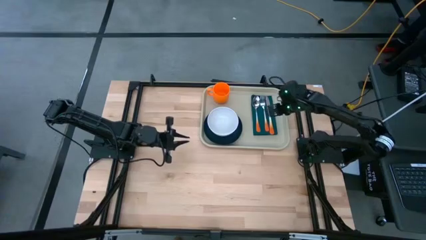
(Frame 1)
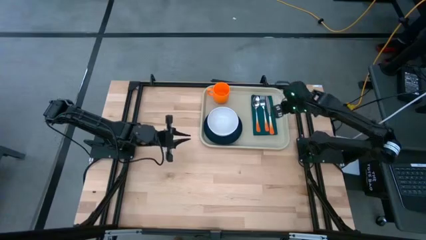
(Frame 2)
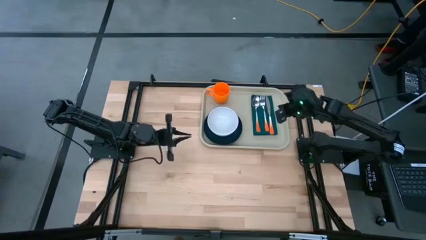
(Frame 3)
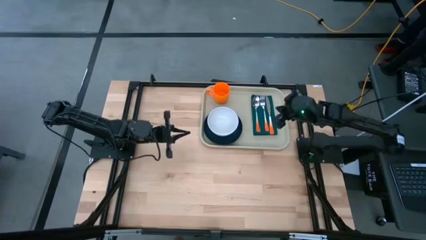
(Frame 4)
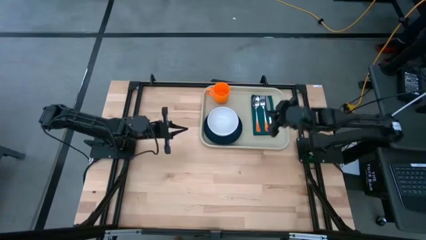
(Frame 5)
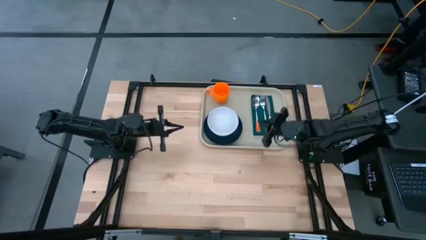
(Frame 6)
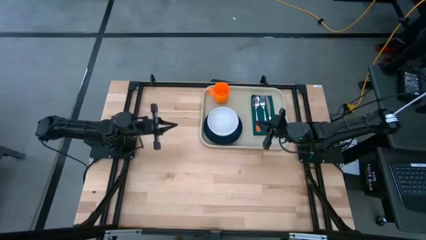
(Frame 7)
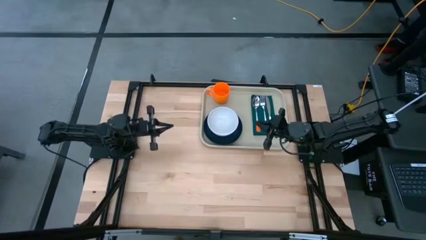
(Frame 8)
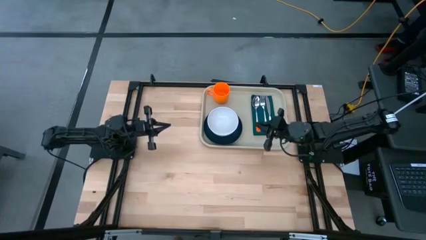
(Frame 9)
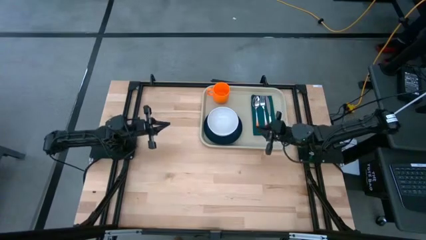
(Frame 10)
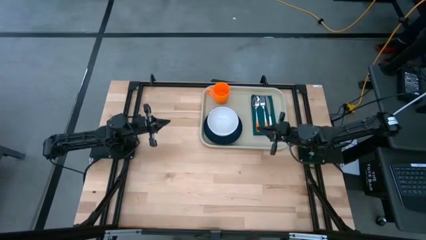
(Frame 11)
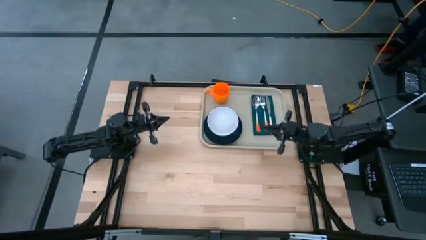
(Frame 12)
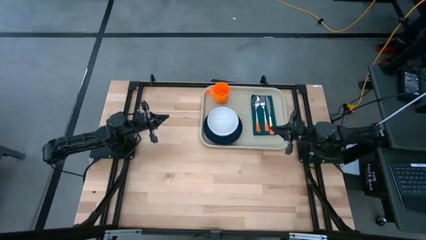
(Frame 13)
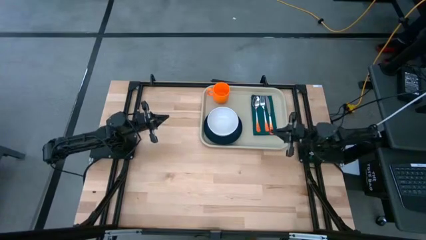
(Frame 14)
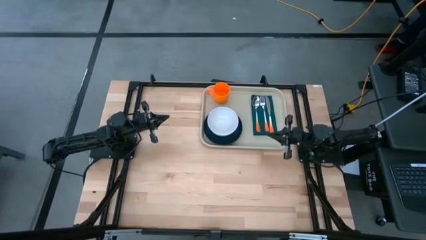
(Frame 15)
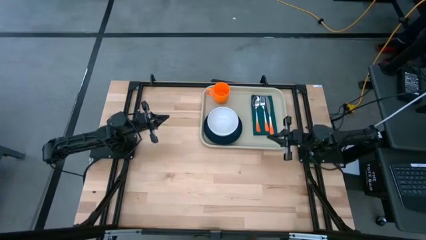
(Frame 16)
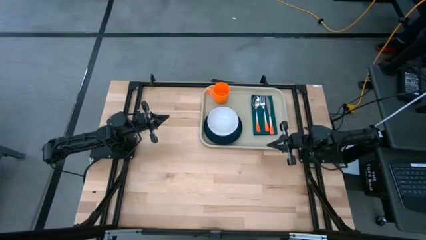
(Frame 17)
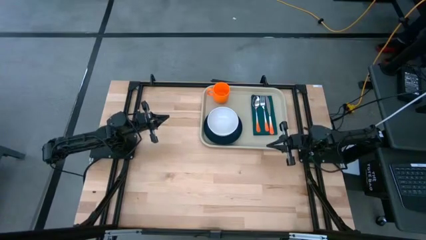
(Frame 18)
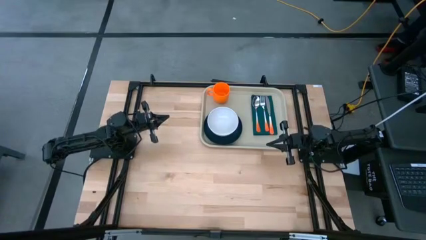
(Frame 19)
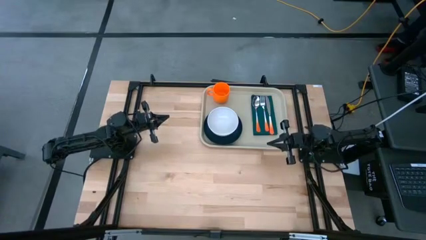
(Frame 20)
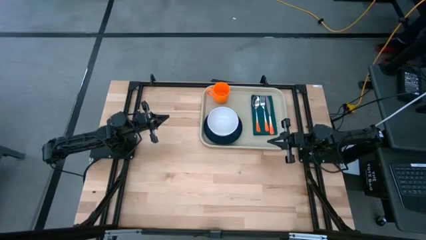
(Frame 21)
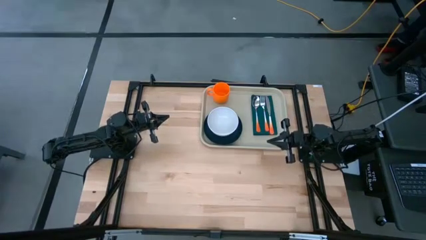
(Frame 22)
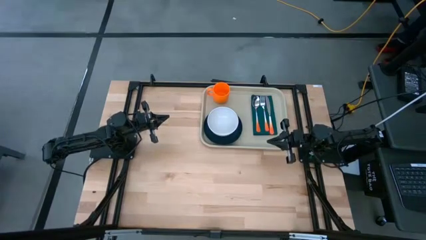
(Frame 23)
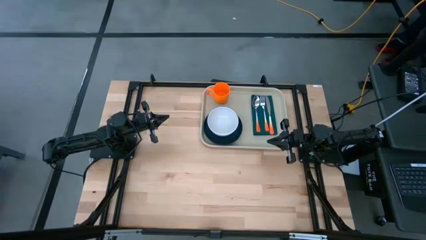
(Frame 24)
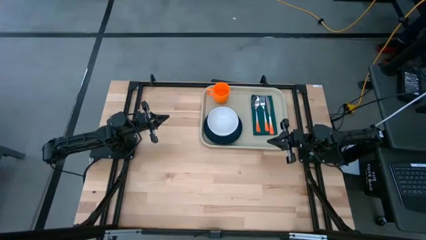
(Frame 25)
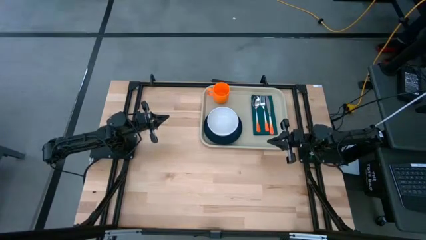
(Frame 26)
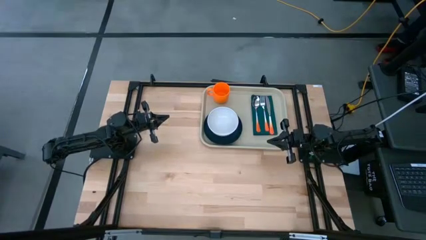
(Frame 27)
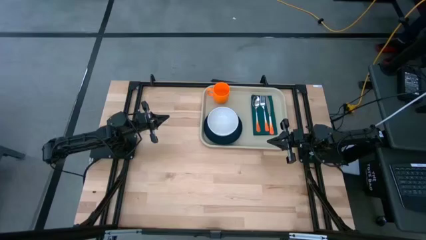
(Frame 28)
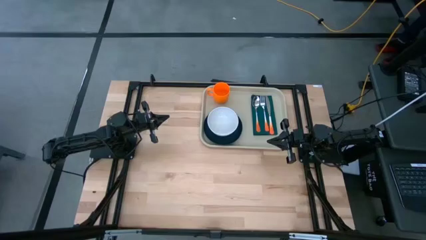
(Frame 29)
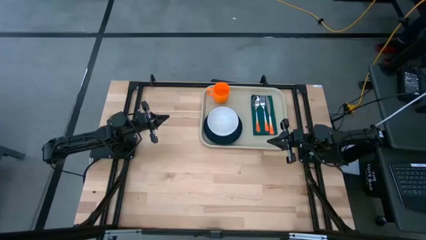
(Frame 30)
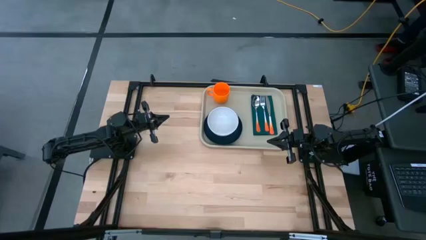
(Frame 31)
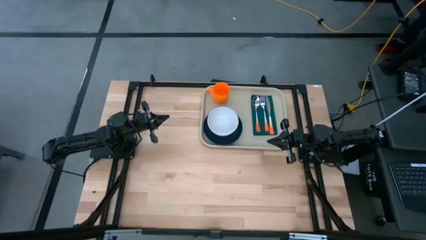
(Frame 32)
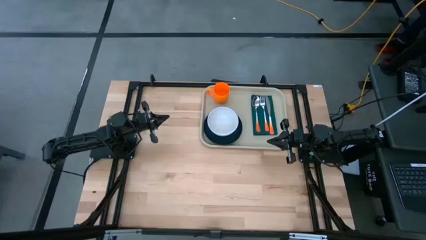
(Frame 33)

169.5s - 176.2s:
Task: Set up tray
Return to Home Position

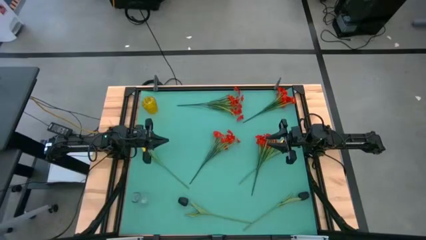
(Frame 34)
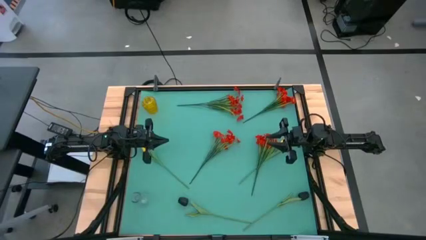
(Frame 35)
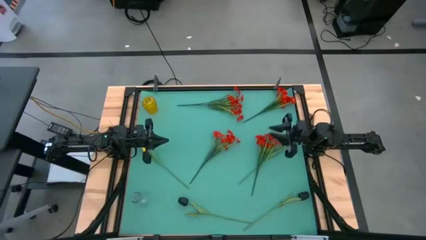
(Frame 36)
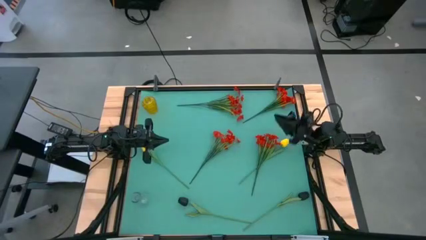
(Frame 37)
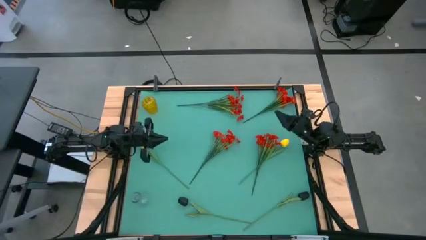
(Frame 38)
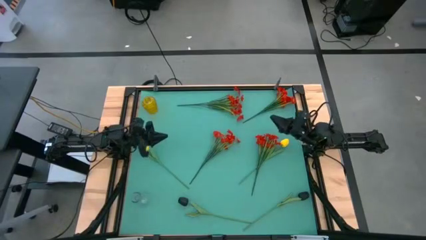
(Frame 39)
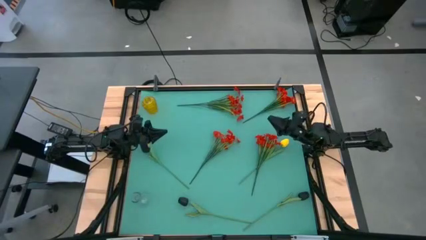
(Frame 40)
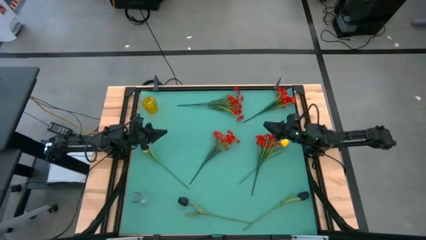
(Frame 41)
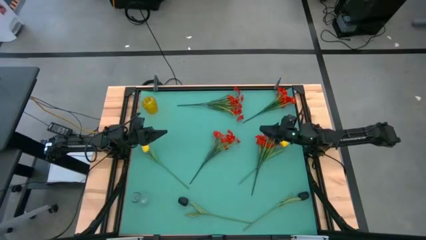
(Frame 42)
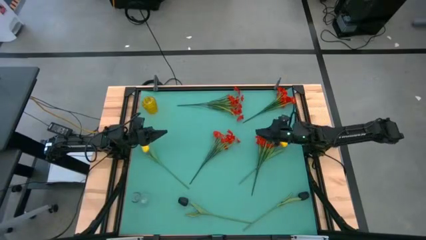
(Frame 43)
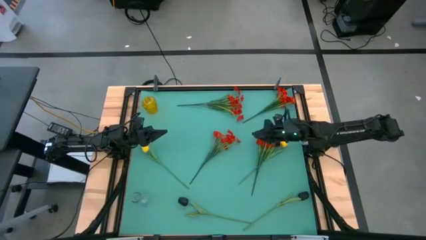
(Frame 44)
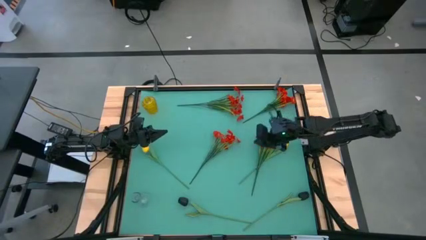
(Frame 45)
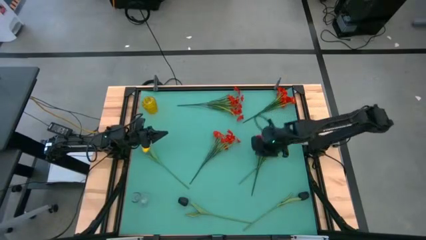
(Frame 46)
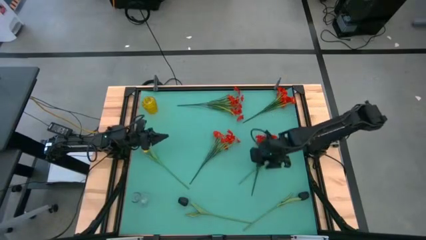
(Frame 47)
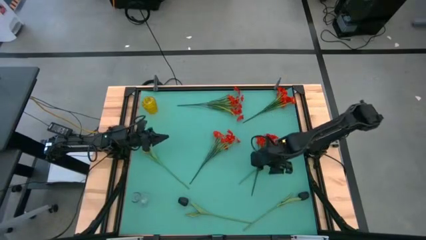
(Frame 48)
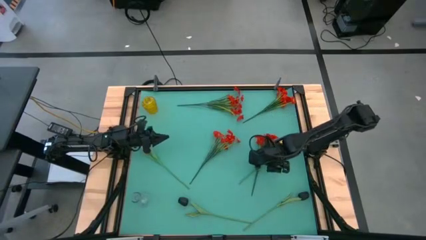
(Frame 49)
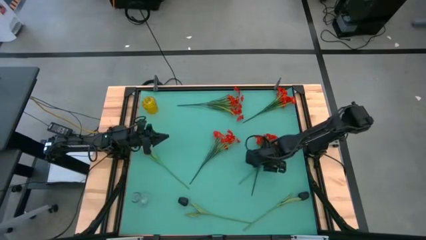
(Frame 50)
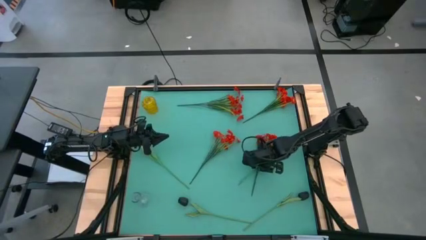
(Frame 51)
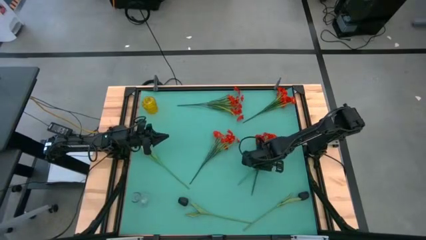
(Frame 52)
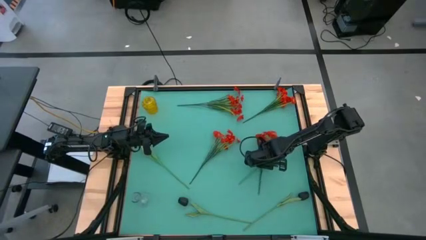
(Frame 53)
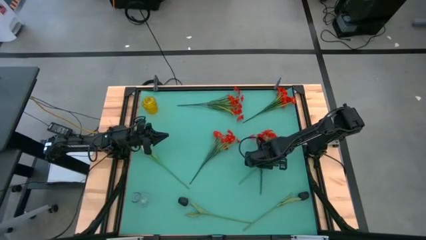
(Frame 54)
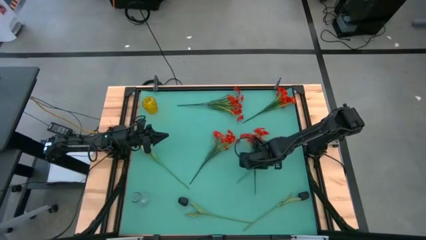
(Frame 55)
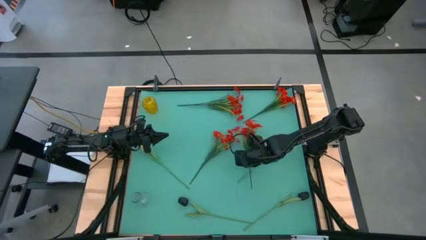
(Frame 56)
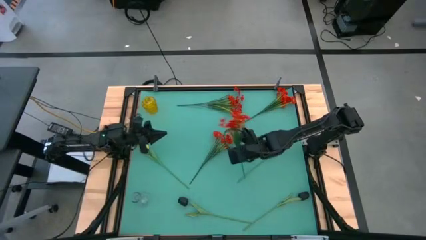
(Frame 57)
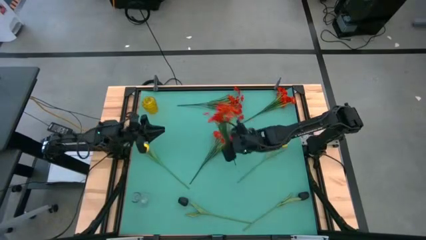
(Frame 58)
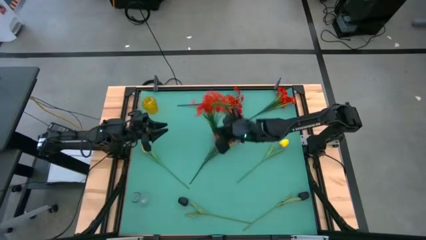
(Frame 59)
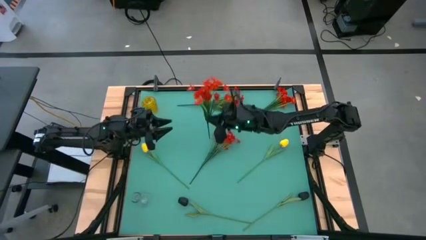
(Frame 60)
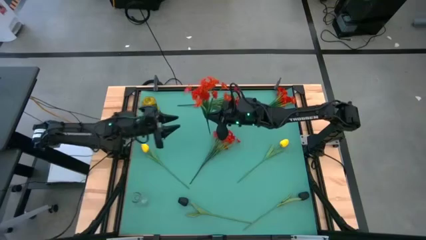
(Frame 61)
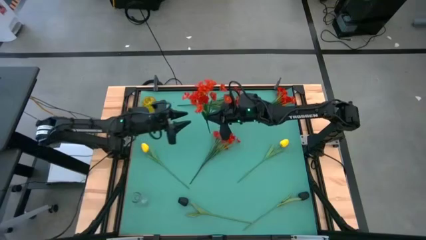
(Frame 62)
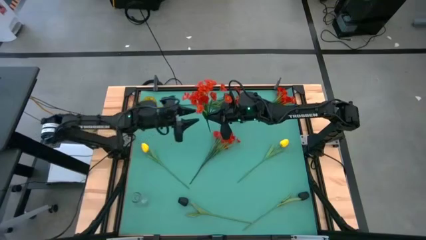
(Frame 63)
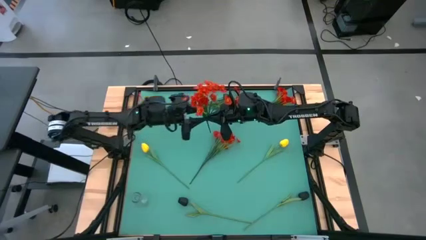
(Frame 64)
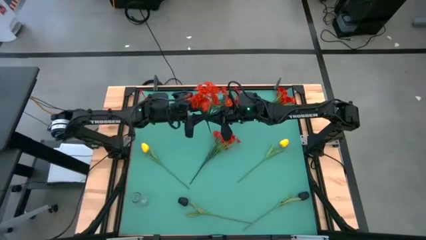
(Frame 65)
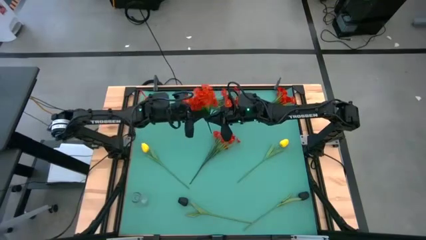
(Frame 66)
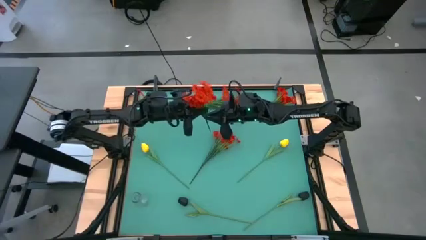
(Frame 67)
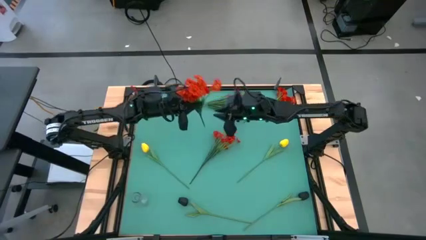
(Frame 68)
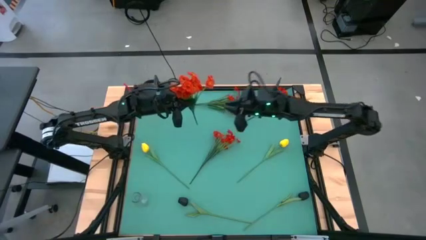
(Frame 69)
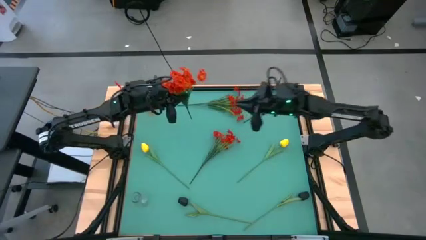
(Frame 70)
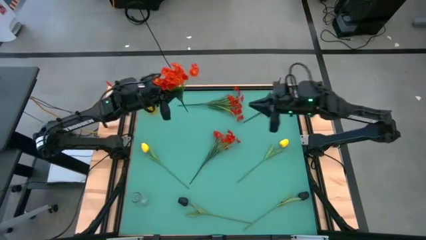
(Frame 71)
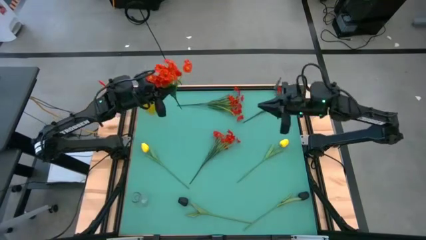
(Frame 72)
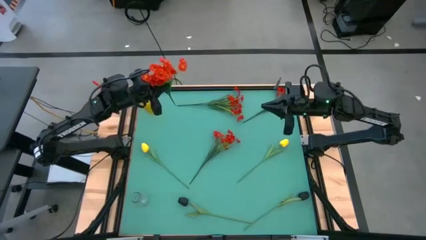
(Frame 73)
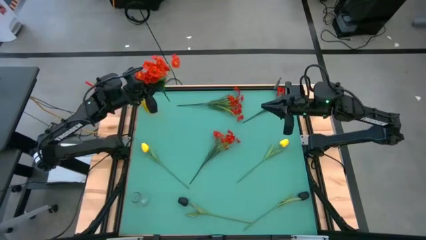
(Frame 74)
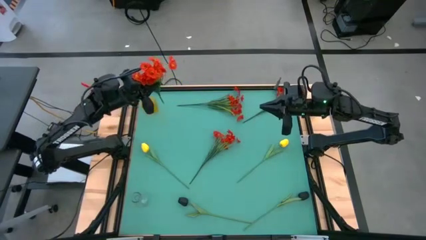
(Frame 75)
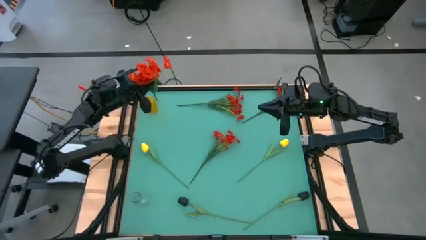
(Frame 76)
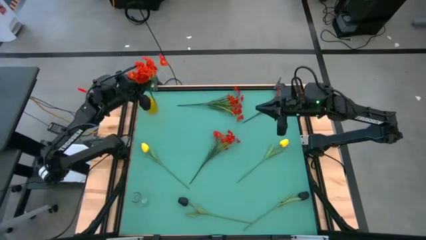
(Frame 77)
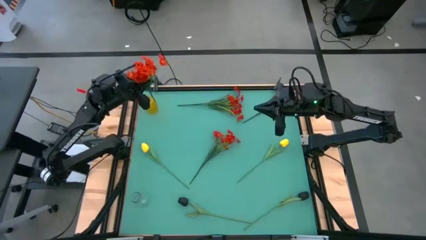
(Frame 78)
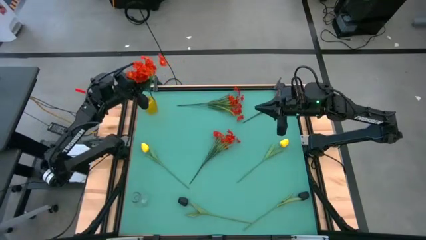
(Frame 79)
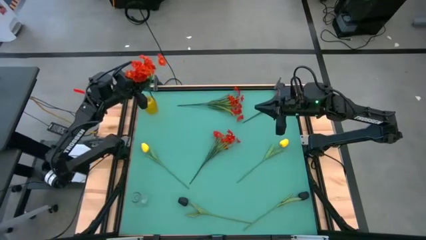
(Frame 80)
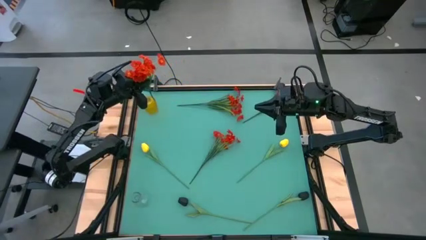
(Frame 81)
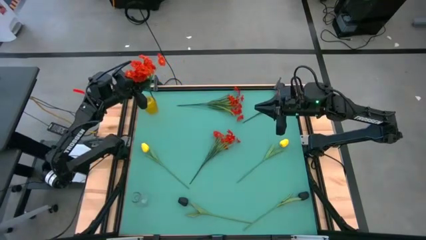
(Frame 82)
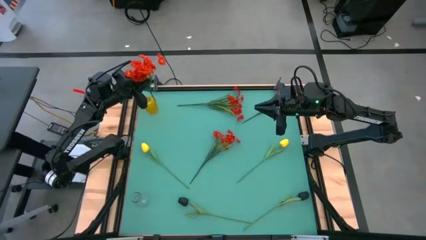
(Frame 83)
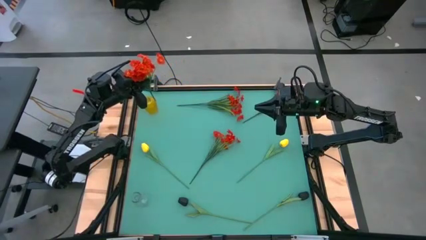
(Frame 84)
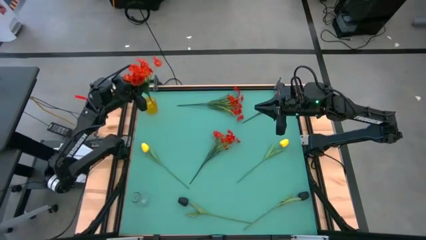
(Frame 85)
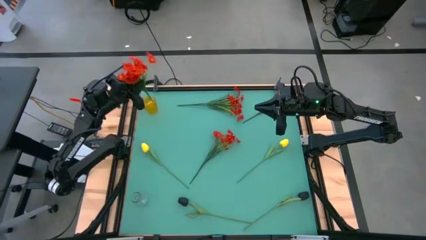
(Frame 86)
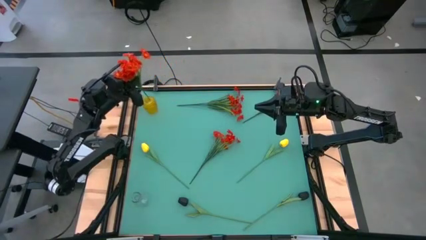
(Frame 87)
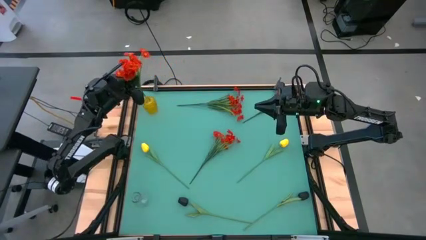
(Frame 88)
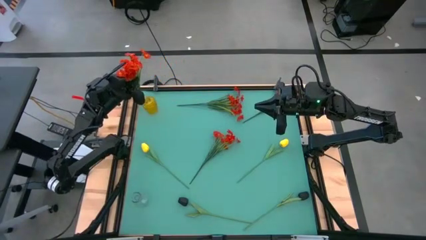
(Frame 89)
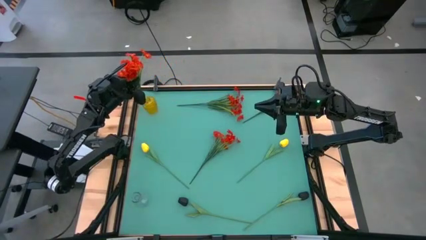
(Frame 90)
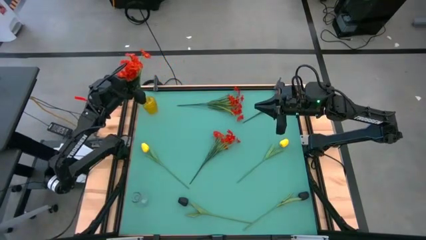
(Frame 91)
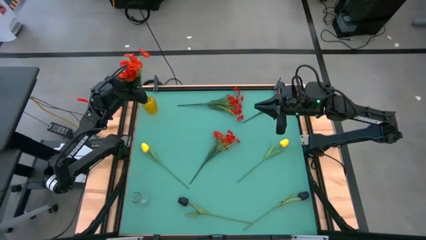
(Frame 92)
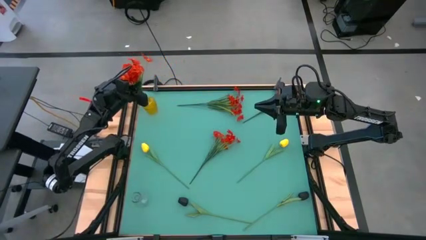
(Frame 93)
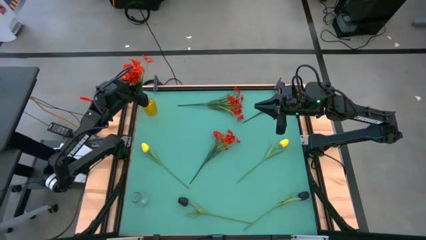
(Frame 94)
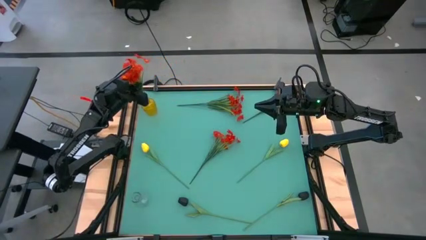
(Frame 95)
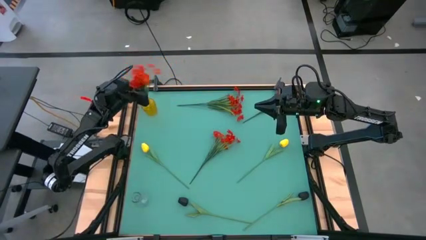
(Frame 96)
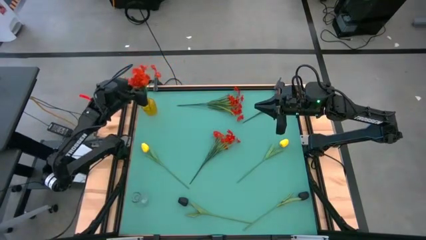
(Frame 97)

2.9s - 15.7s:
Task: Sort flowers into vase by color
Put the orange flowers into the yellow vase
